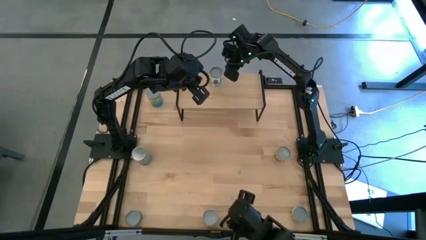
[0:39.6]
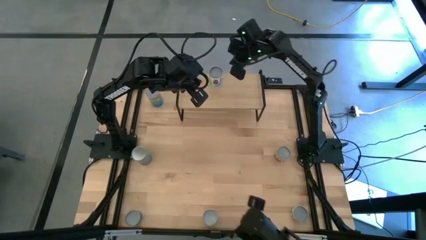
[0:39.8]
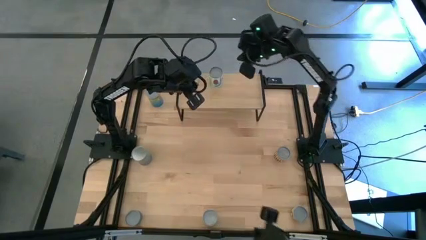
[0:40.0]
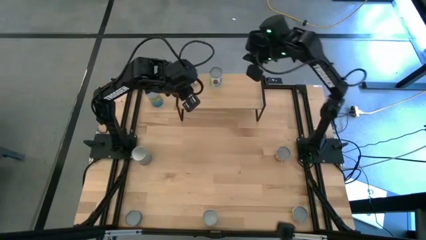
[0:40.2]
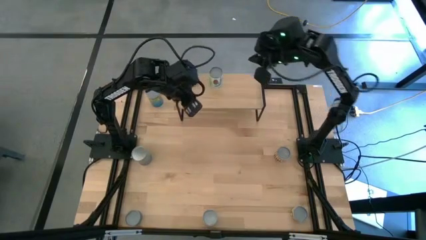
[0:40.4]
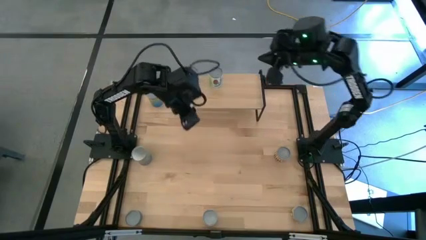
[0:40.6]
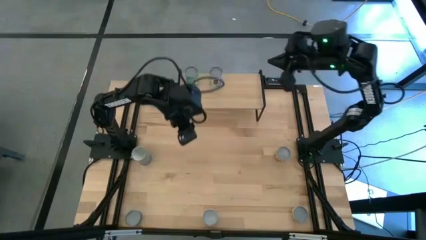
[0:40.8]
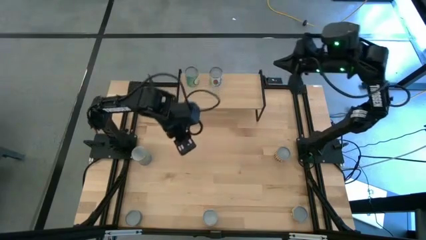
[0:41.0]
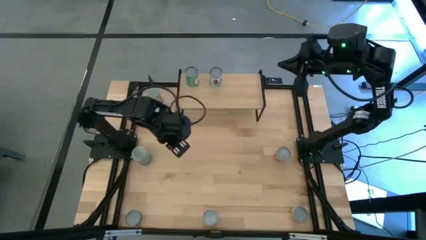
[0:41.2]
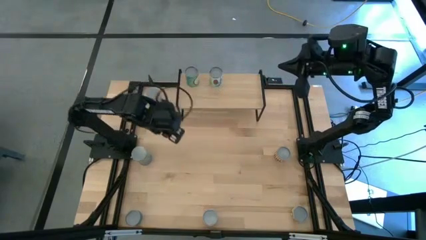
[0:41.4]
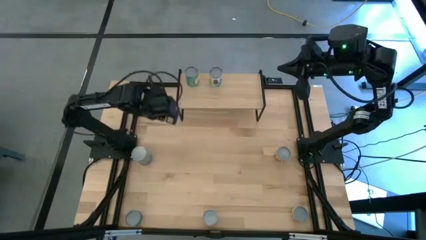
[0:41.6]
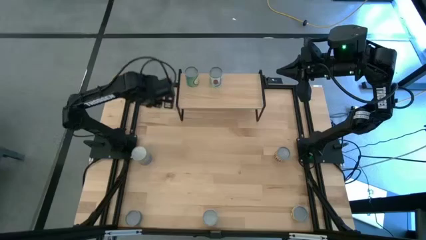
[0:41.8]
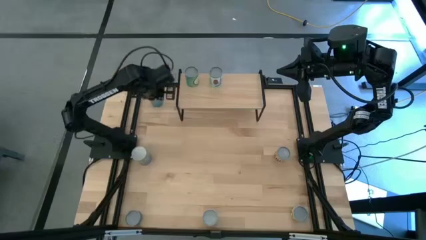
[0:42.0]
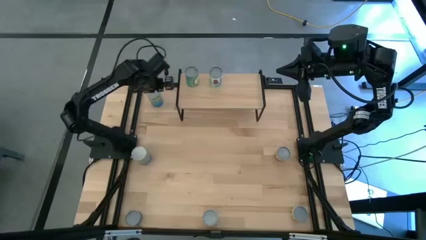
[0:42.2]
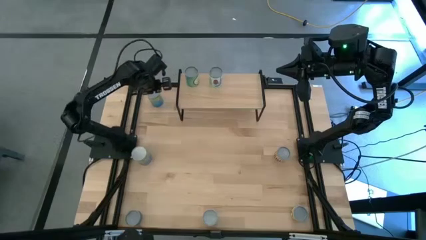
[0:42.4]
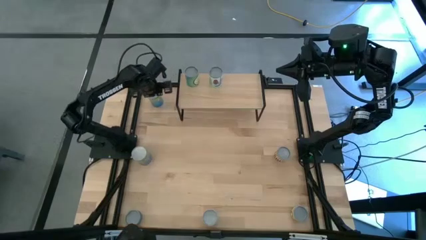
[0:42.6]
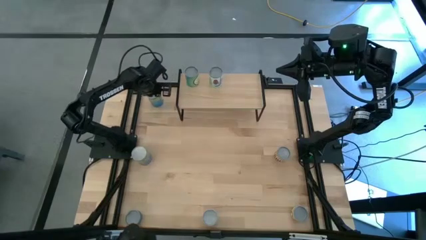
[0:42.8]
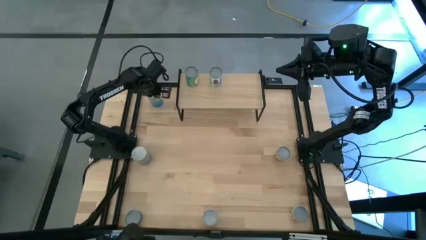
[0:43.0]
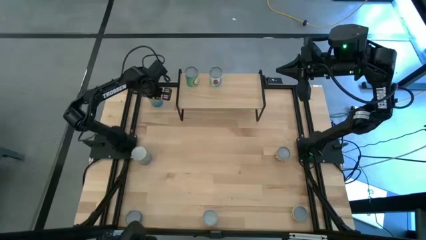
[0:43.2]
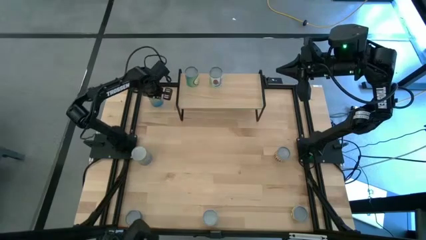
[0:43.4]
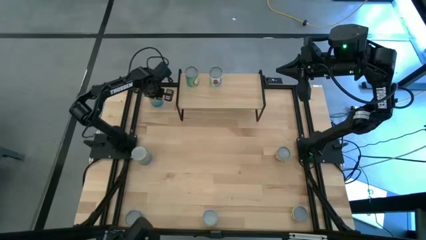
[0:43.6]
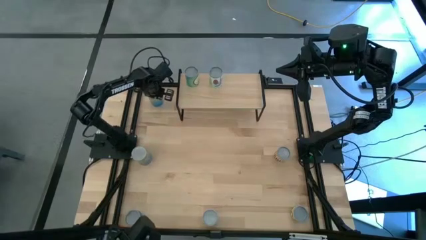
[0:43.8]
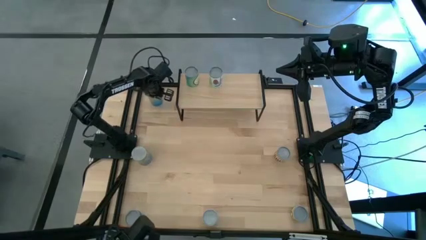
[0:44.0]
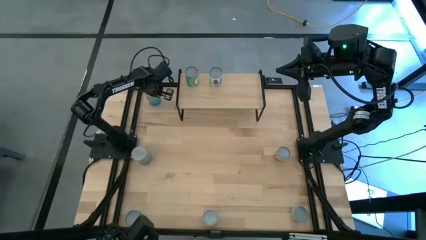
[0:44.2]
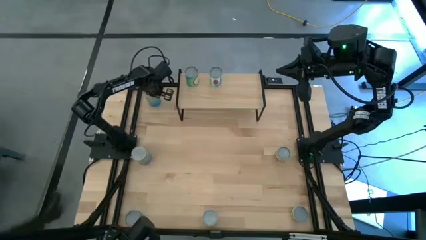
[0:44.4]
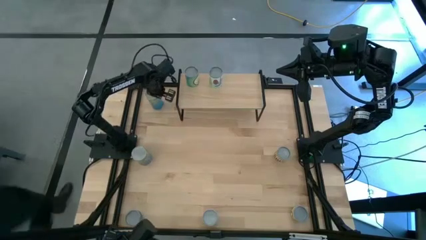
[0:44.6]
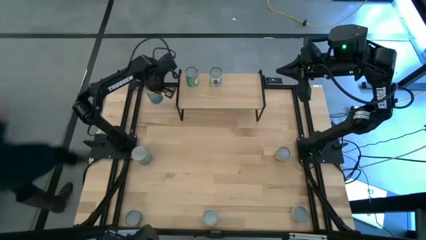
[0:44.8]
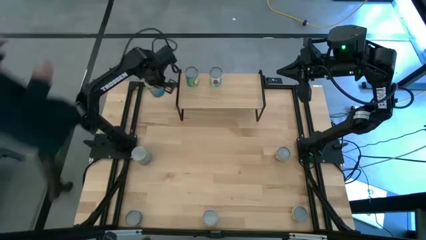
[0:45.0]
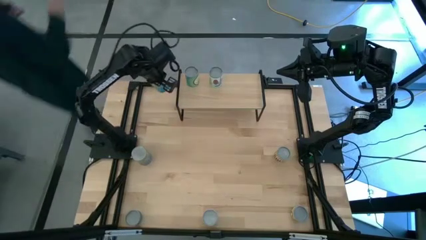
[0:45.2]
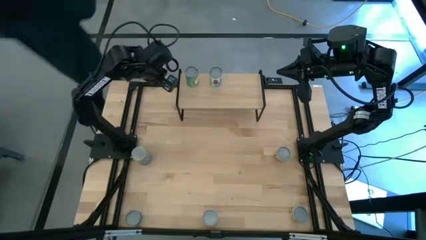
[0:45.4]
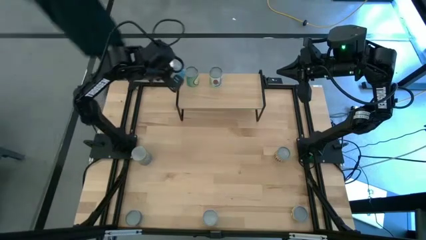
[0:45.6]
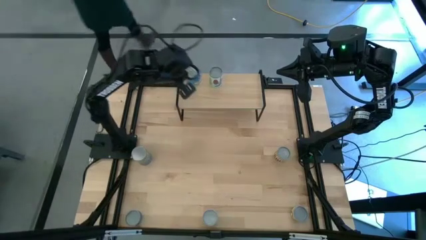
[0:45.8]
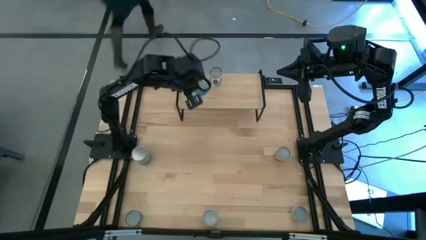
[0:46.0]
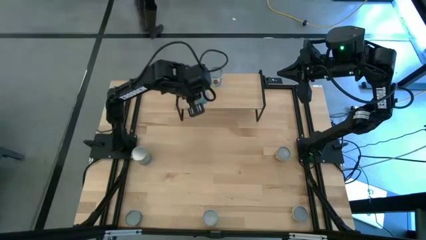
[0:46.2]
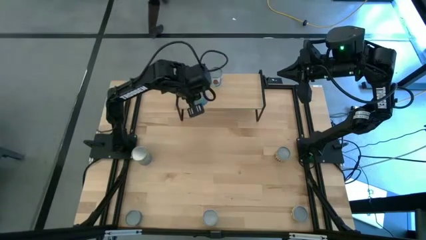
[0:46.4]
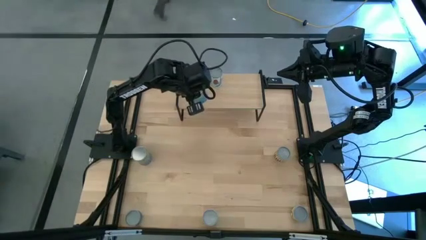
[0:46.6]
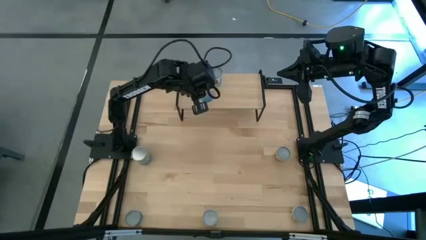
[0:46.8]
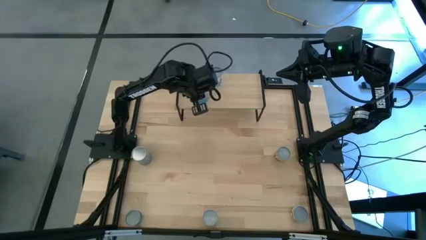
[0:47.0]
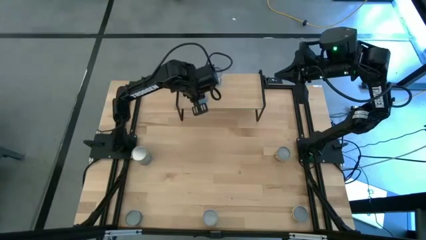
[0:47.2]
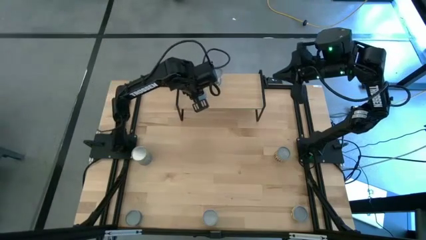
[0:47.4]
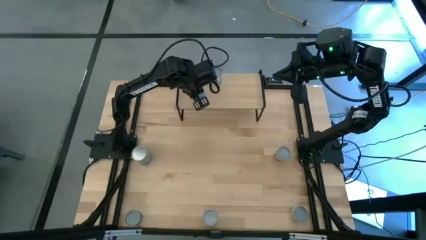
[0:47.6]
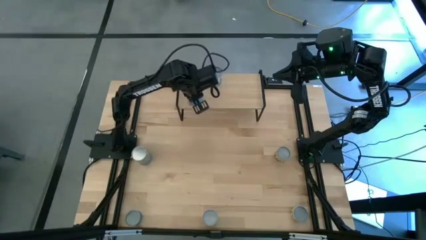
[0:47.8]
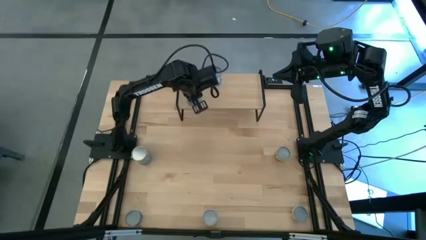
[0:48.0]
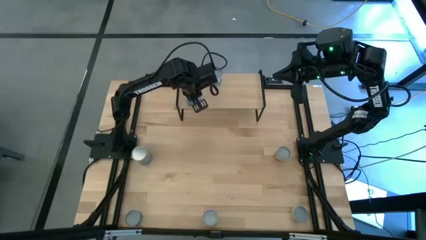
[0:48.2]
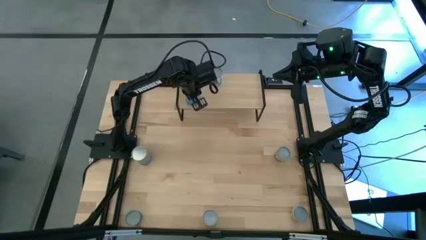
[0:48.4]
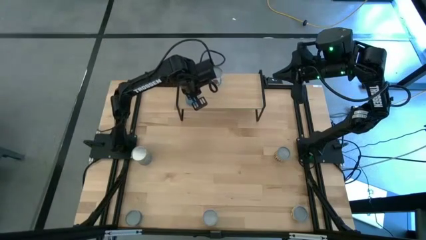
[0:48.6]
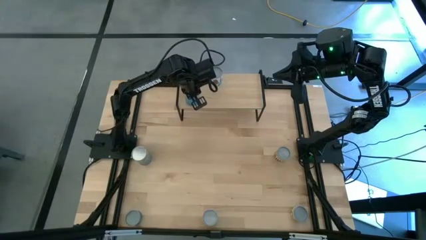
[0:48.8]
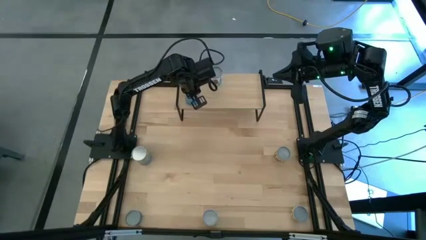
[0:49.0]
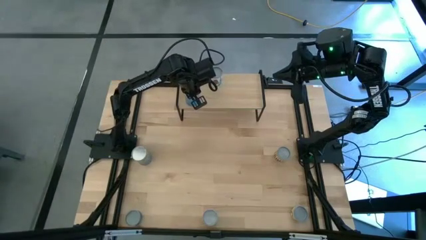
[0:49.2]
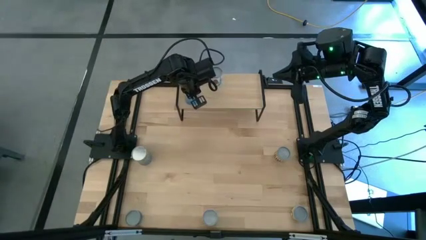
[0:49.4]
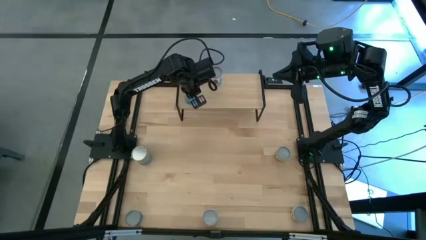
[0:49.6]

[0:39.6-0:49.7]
Task: Pick and place cans onto a shelf
Put the top canned cherries on the shelf

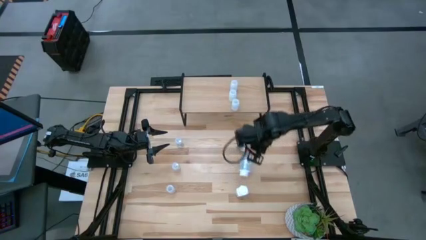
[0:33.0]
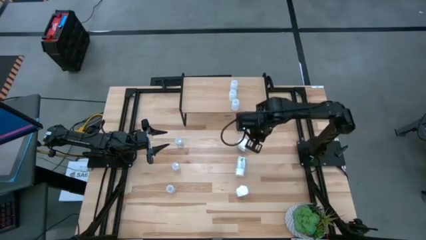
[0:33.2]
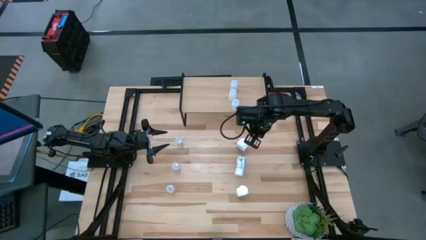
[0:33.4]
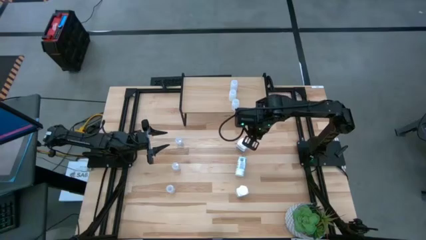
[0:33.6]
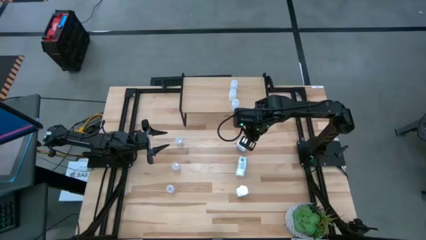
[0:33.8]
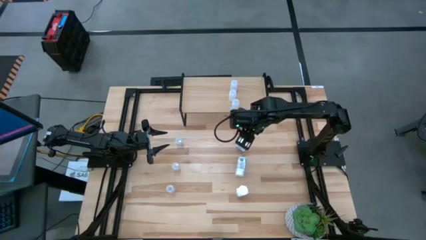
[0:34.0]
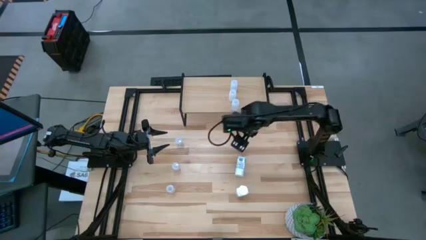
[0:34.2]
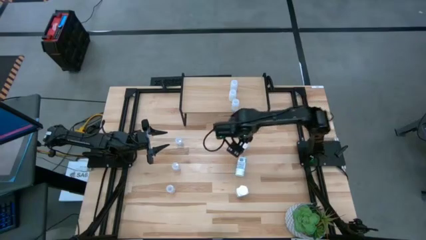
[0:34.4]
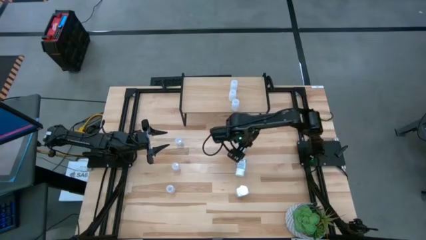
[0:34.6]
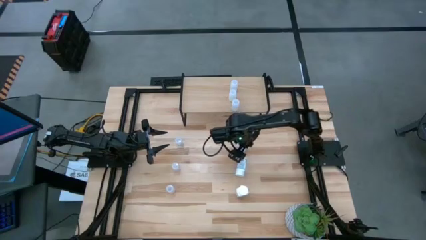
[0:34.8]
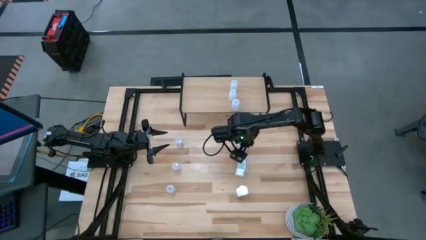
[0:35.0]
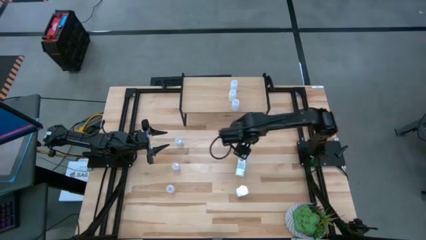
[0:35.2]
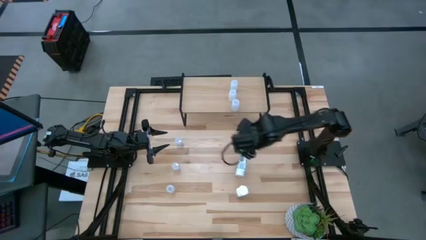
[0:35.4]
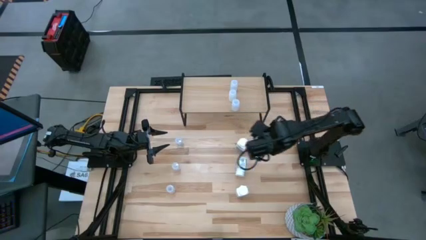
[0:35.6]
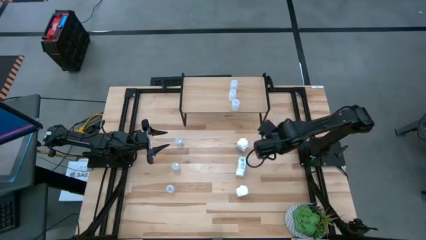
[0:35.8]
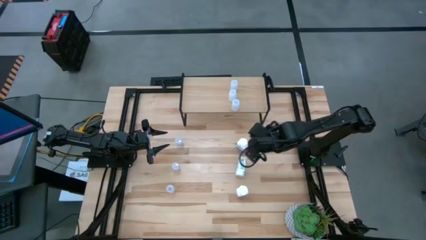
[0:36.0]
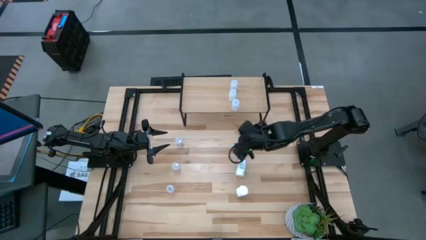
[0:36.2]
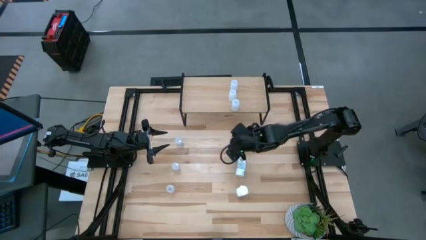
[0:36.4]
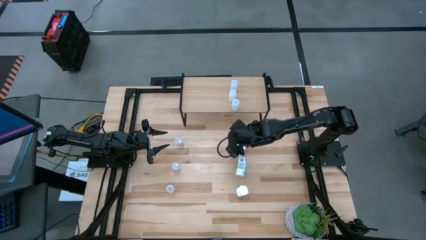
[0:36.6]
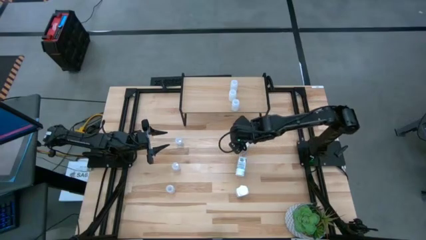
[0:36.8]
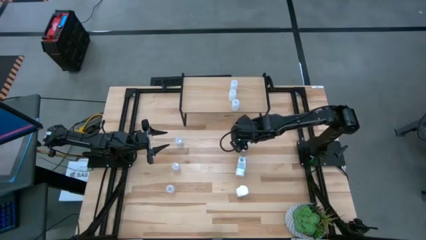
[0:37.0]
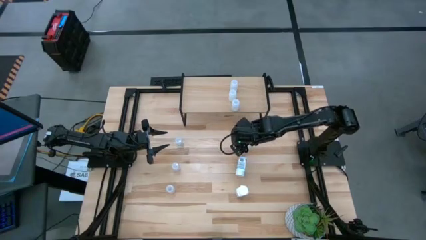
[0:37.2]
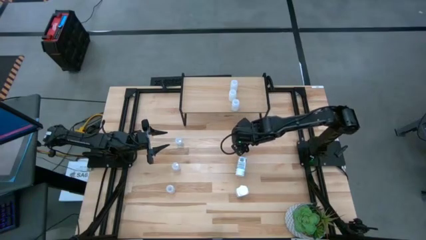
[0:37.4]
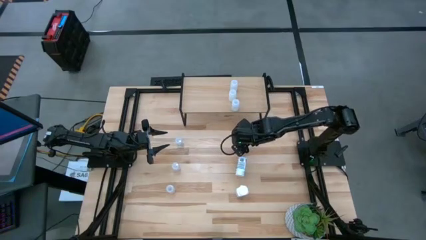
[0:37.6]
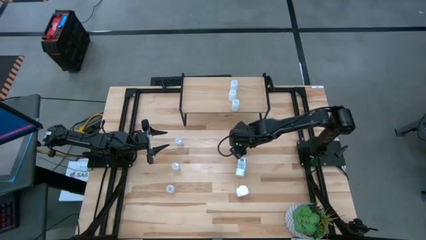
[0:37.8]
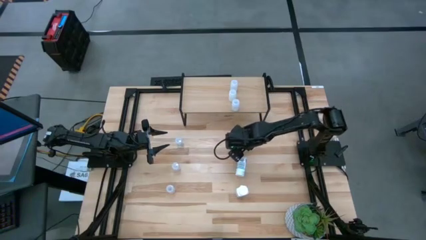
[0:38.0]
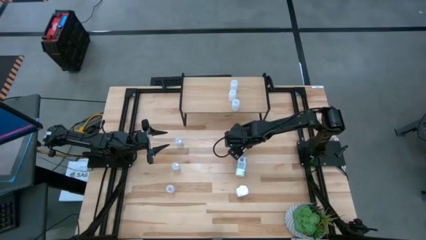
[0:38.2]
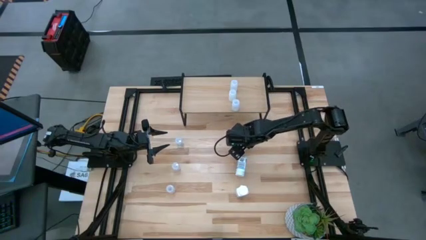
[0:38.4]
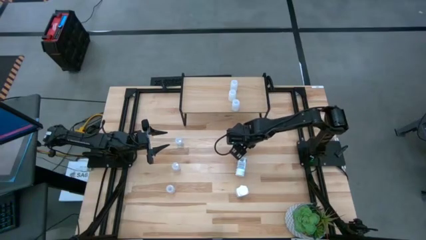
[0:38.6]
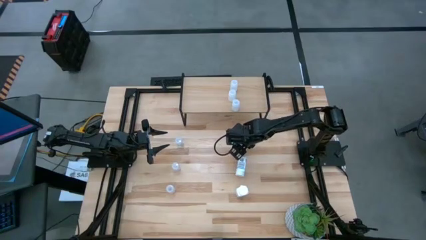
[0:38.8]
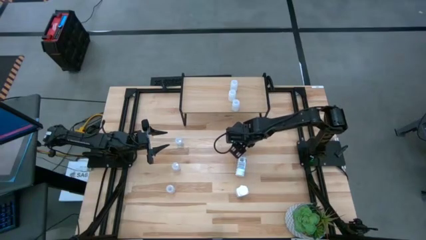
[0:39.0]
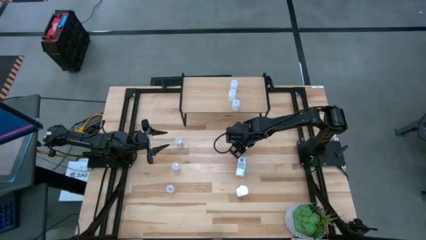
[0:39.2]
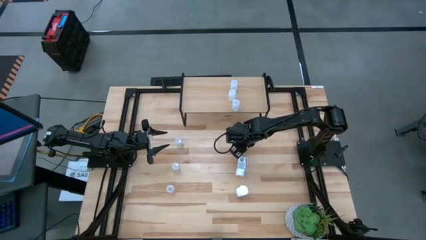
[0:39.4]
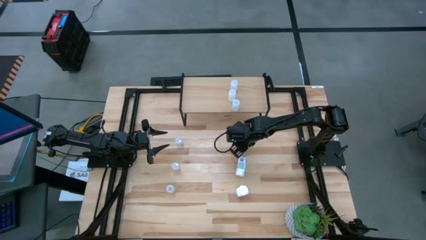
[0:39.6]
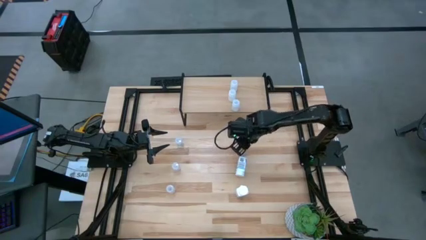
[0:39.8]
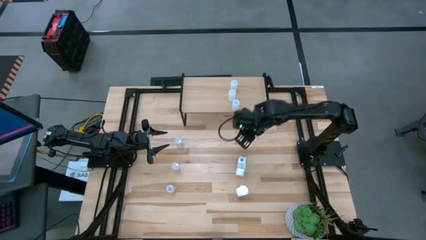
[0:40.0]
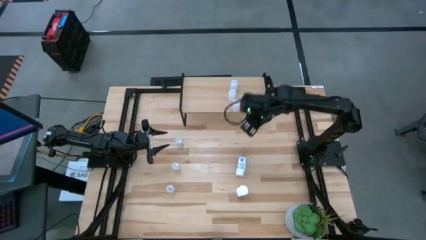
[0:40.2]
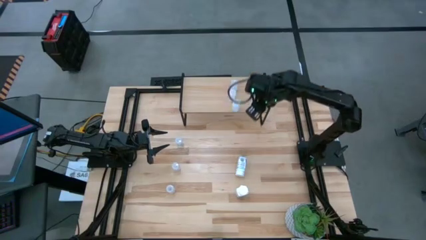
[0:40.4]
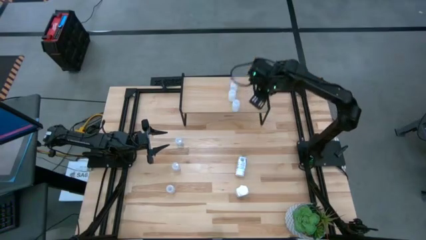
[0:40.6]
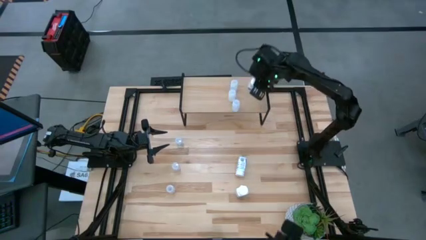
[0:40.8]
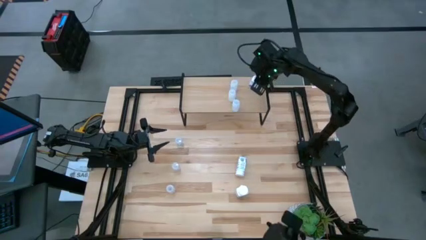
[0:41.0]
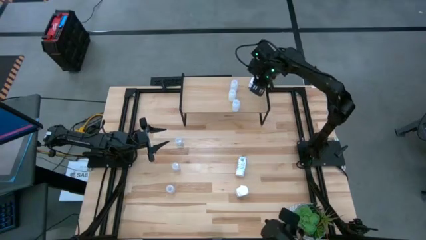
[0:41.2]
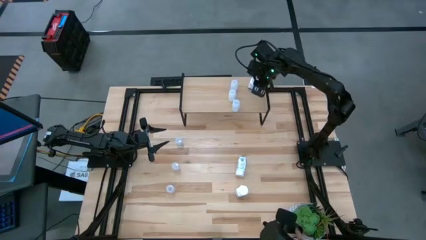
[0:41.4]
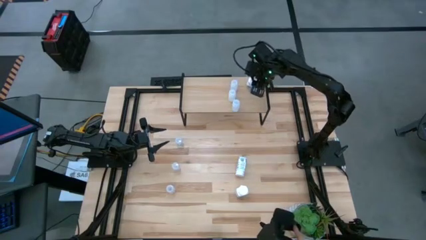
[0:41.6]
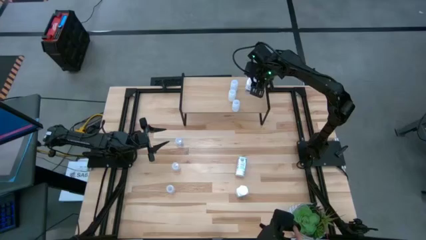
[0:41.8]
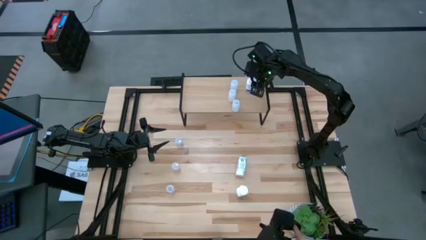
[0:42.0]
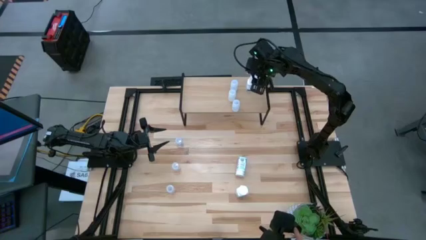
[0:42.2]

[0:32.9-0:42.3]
Task: Pick and place medicine bottles onto shelf by color
Put the large white pill bottle on the shelf
